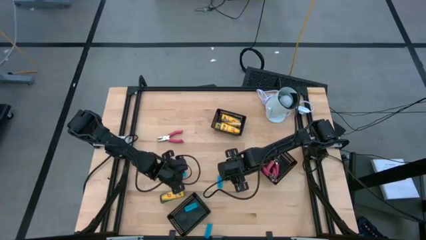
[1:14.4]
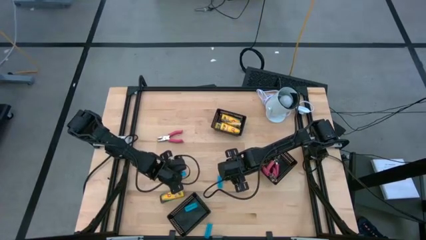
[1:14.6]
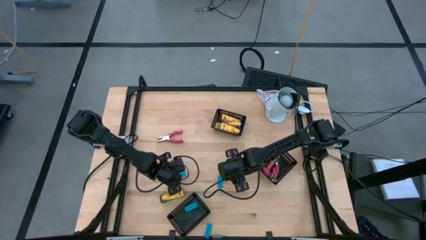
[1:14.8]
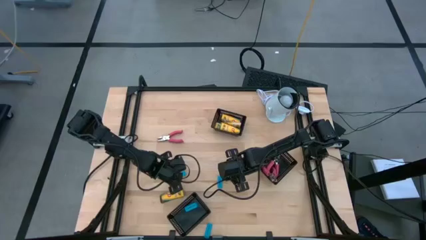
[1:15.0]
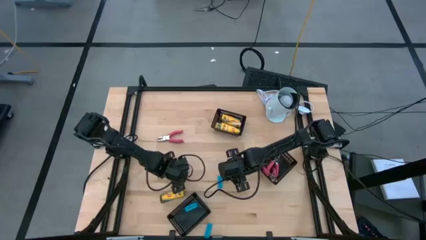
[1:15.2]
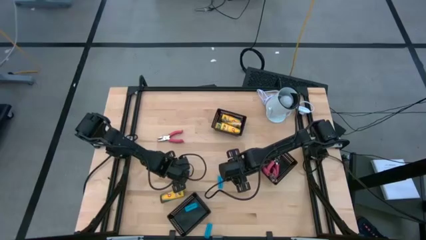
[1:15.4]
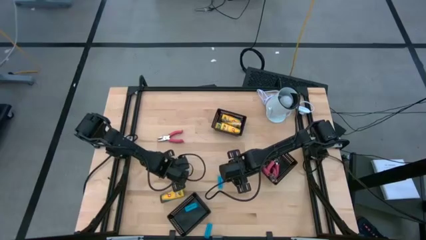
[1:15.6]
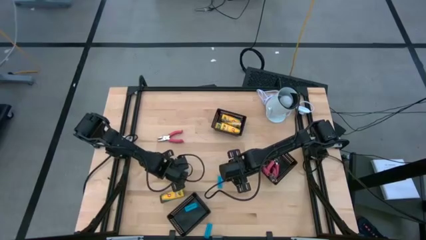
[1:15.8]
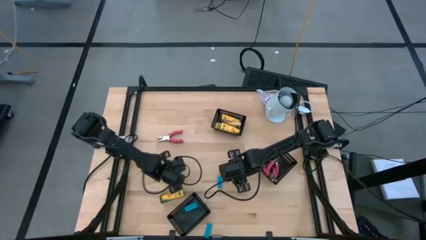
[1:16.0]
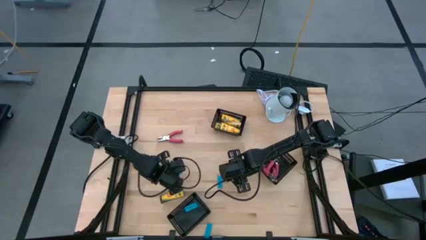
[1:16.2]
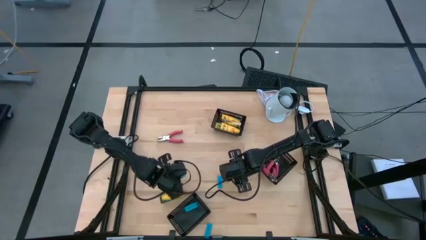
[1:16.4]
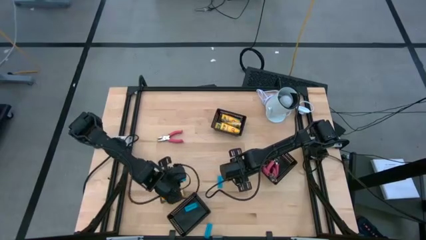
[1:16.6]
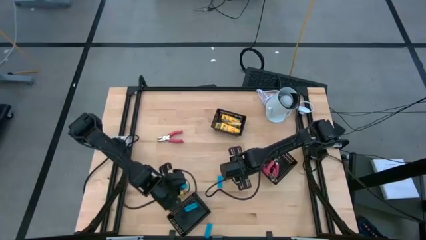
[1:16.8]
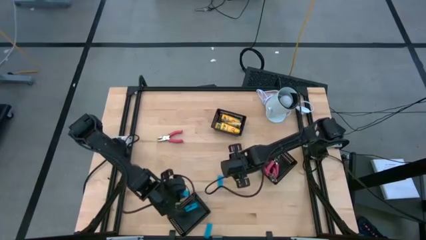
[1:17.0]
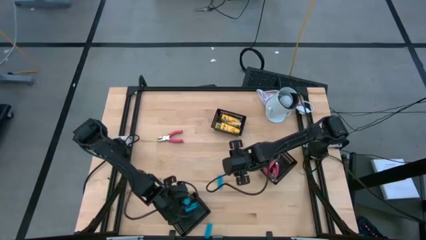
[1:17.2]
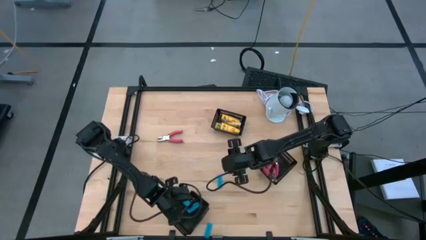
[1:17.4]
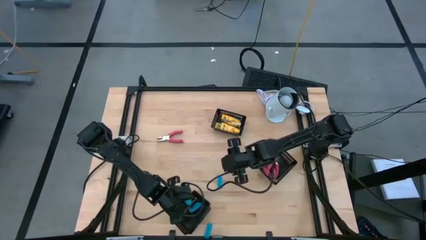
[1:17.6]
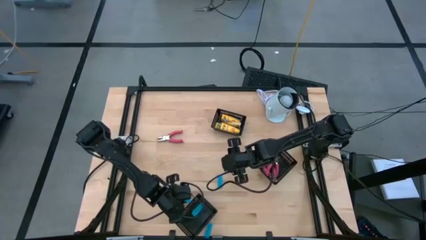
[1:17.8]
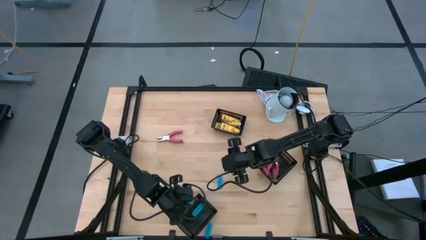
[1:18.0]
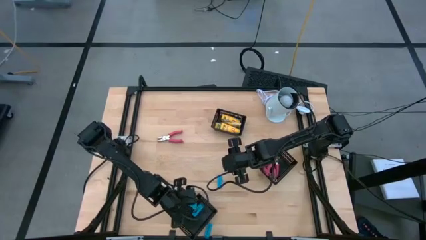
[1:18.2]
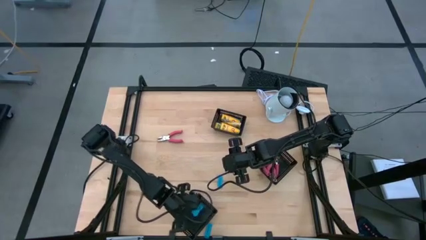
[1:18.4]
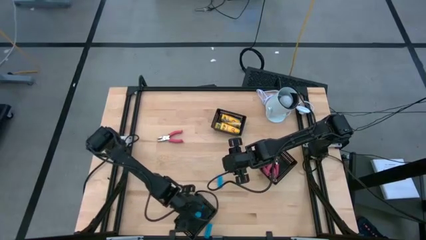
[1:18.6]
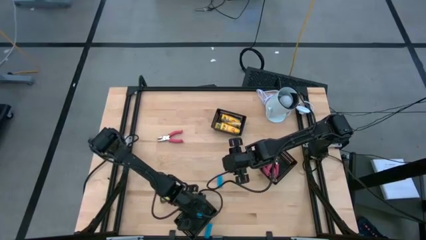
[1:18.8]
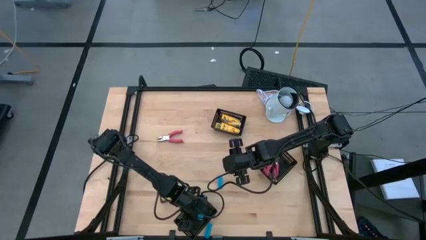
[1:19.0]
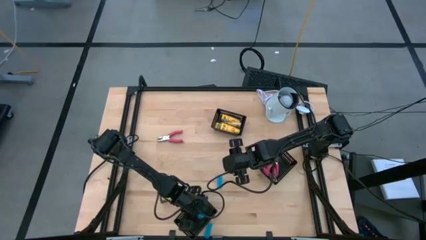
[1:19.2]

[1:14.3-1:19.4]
Task: Pick & Place School Supplies
Put the blue eraser into the bottom black bin

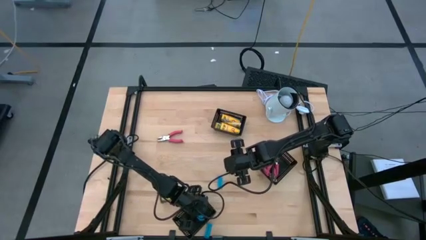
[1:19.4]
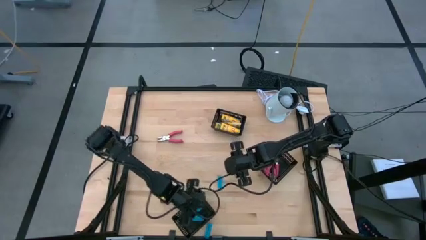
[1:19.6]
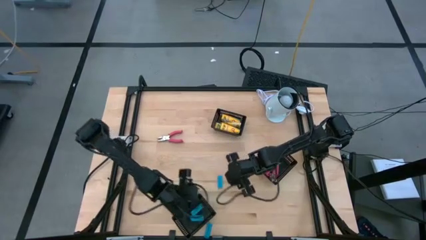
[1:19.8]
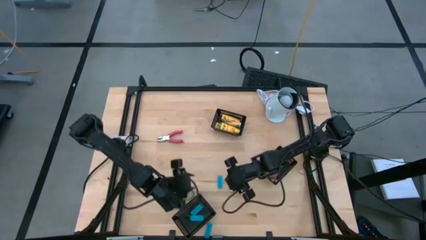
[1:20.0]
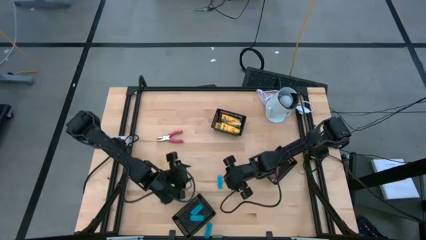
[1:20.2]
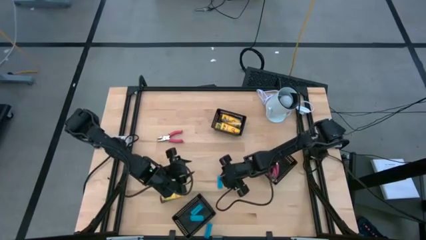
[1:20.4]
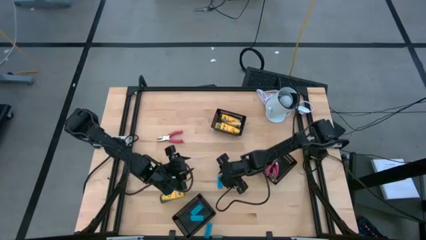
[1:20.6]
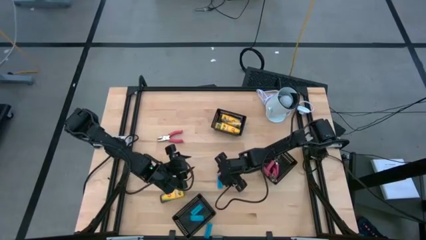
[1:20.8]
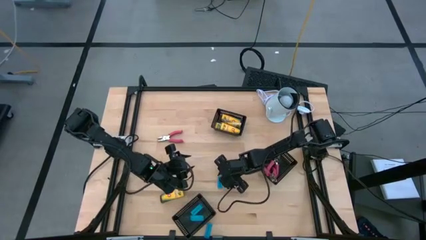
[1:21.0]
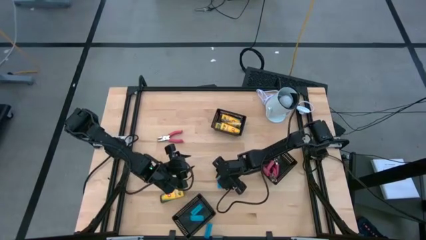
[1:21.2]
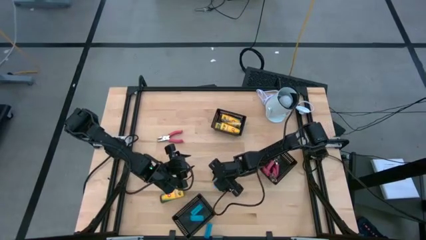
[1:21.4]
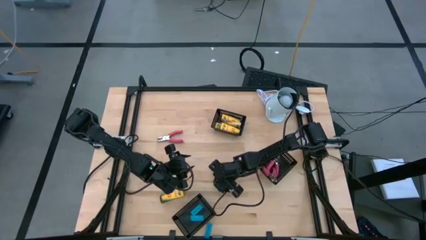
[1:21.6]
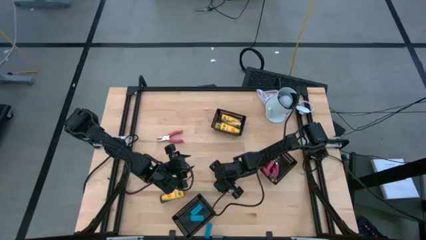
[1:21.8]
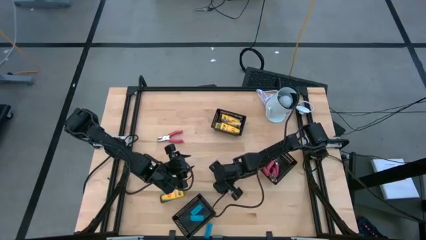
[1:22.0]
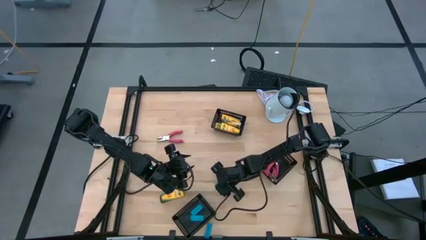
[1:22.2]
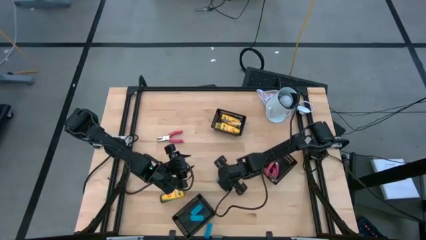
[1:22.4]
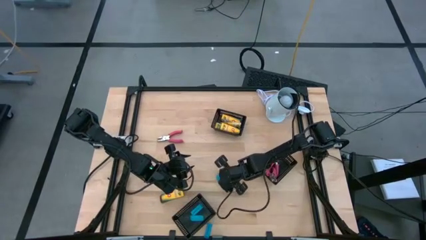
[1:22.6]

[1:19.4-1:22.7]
Put the blue eraser into the bottom black bin

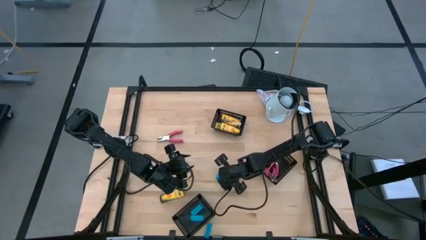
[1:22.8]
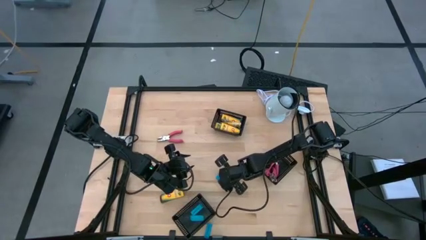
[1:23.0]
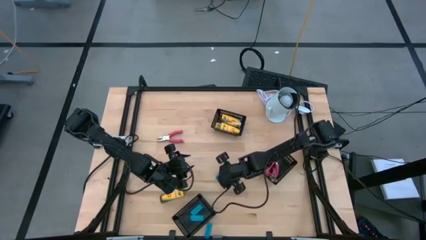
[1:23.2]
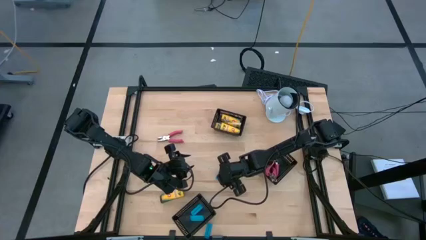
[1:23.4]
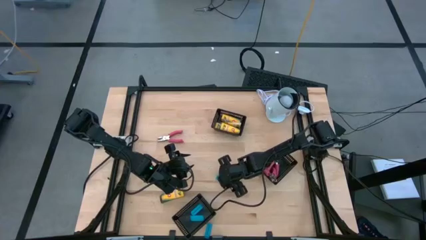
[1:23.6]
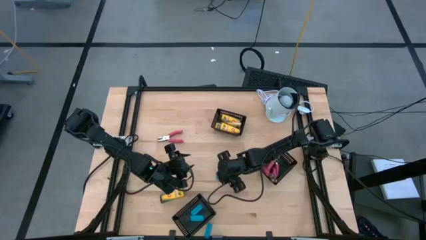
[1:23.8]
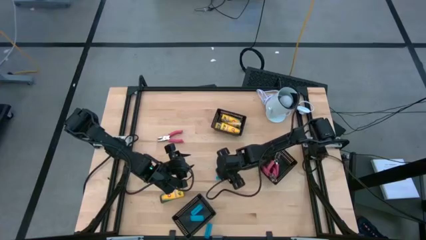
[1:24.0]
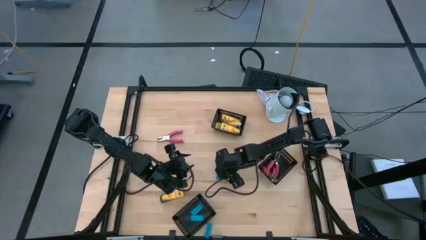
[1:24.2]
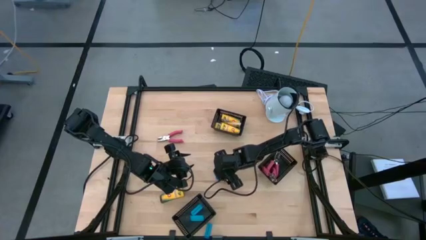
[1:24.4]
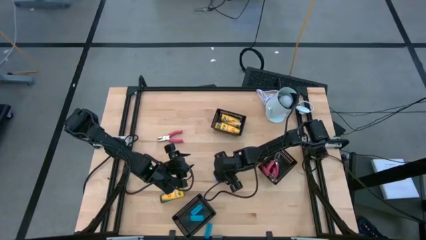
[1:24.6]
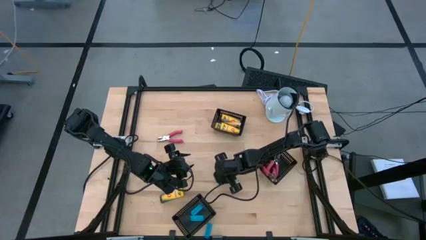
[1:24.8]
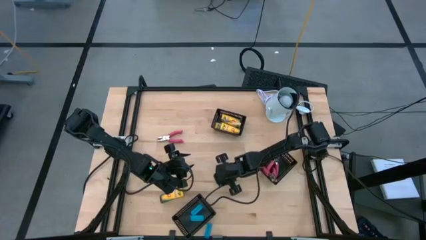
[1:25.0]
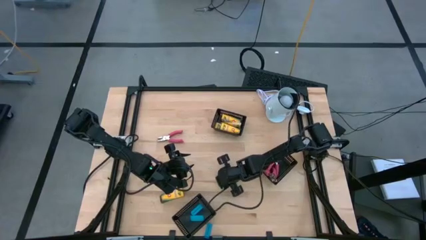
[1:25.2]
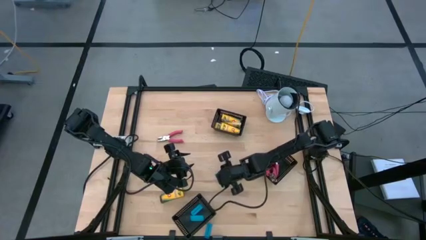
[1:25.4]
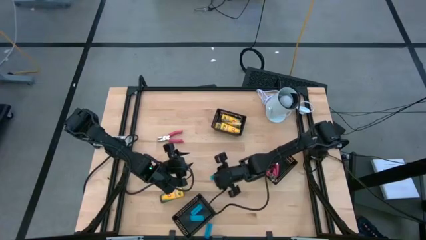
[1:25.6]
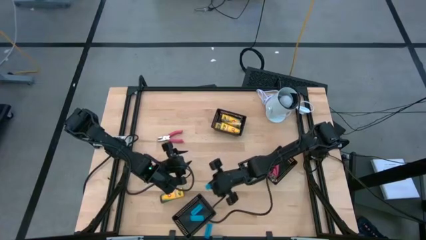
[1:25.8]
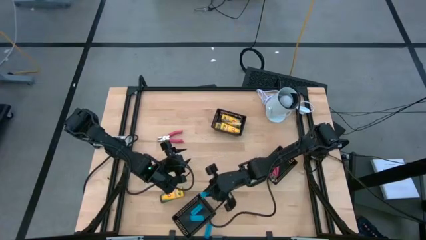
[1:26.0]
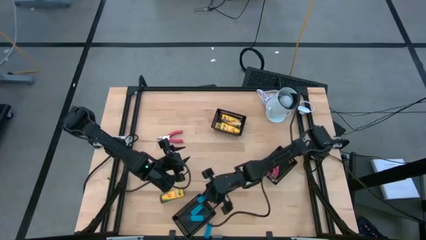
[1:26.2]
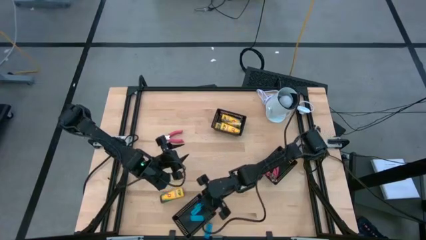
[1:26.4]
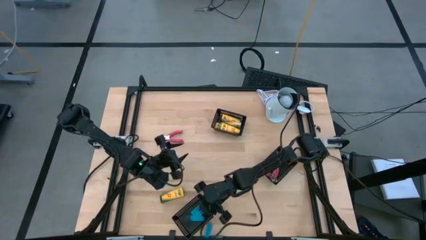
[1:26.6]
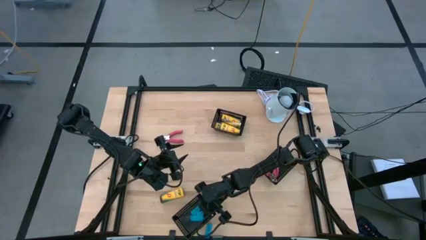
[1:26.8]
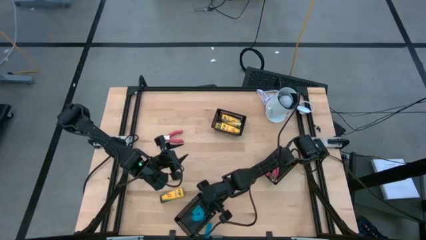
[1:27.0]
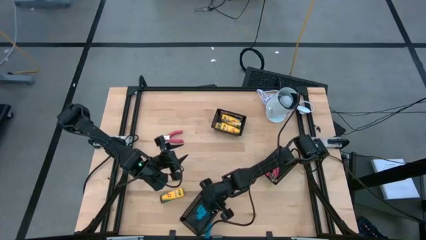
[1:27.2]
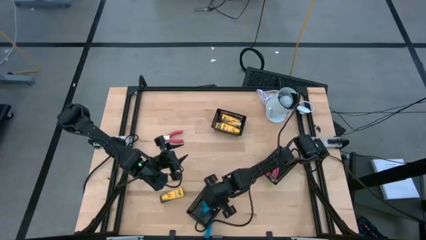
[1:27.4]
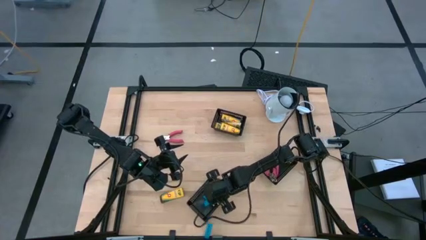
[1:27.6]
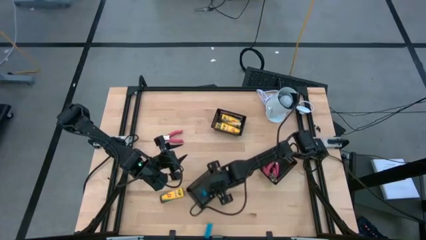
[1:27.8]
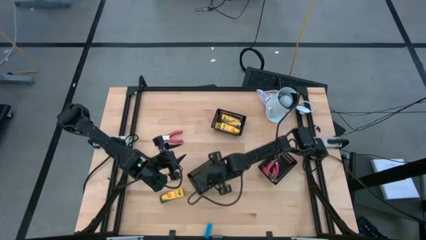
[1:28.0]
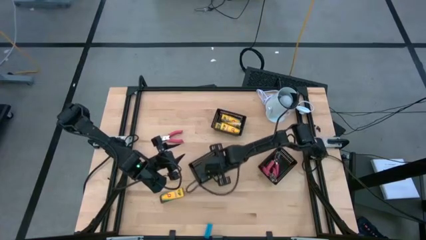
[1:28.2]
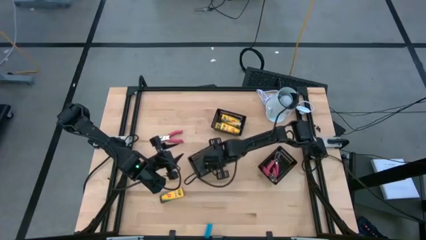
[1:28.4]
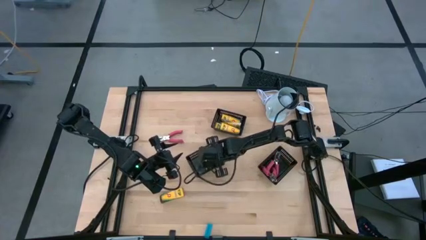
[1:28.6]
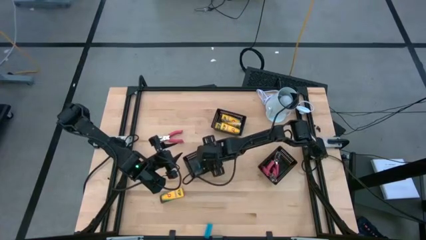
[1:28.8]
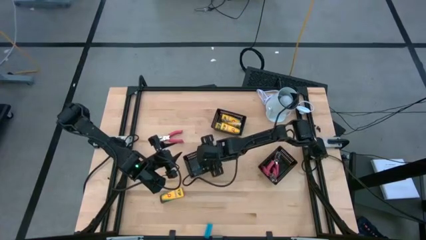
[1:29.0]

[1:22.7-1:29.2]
Put the blue eraser into the bottom left black bin

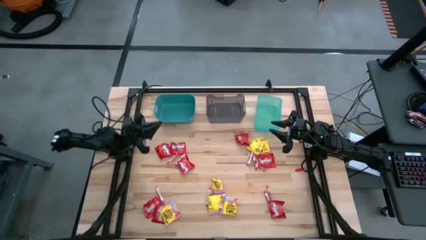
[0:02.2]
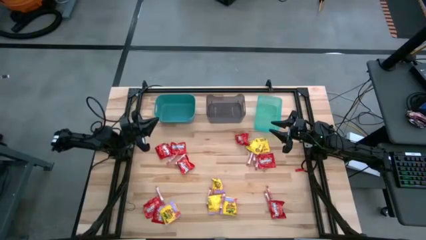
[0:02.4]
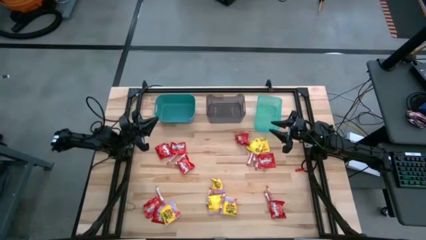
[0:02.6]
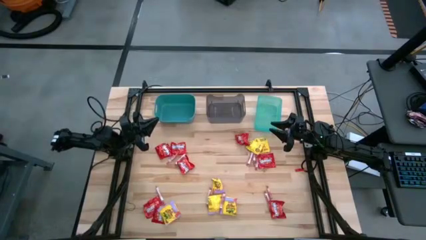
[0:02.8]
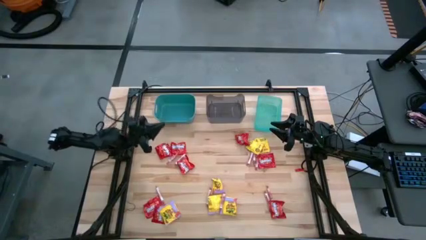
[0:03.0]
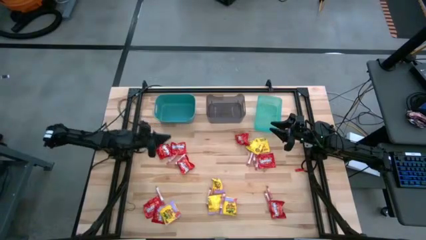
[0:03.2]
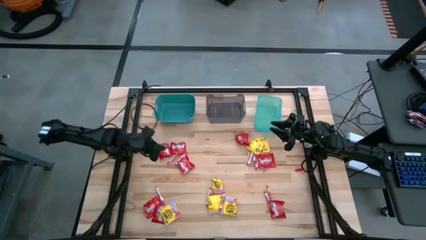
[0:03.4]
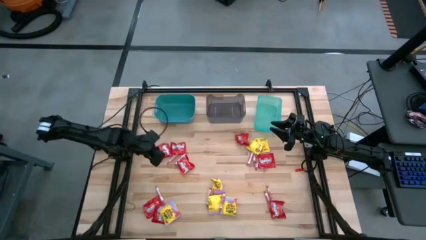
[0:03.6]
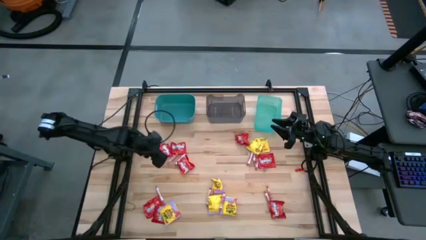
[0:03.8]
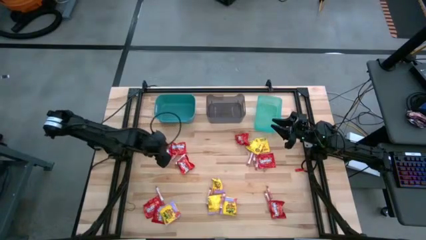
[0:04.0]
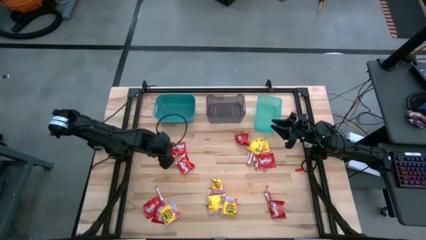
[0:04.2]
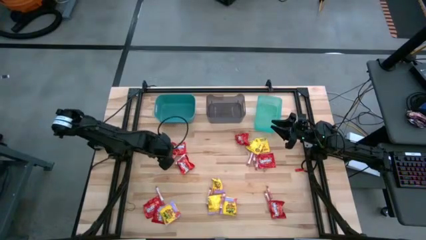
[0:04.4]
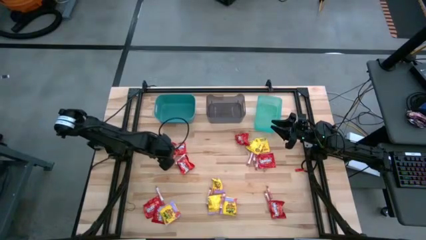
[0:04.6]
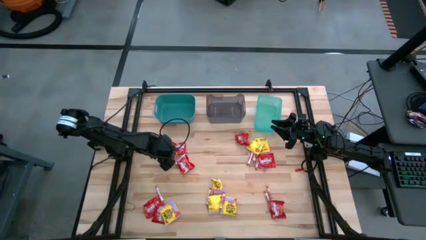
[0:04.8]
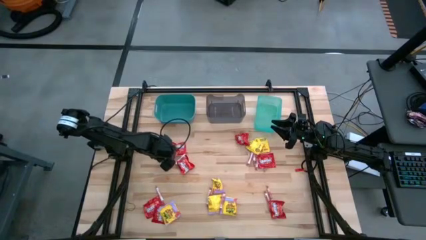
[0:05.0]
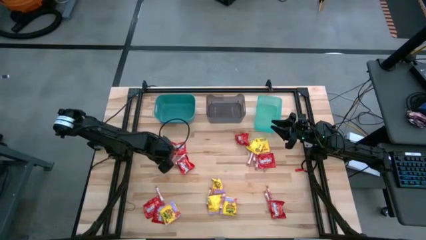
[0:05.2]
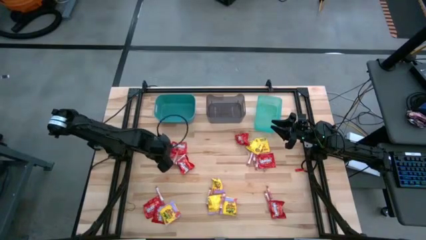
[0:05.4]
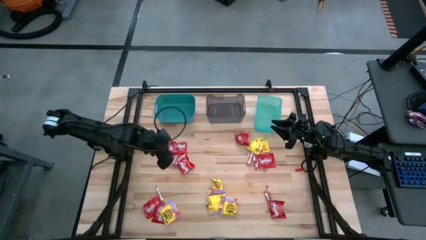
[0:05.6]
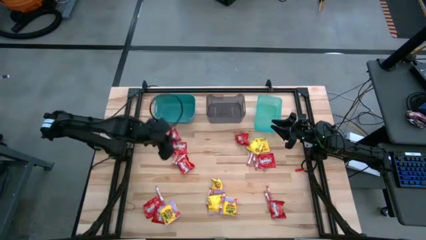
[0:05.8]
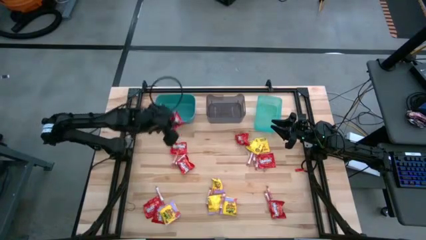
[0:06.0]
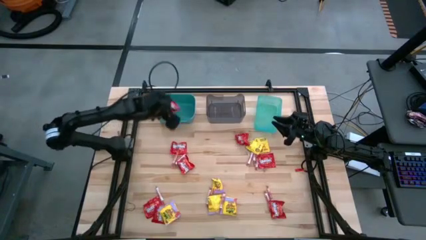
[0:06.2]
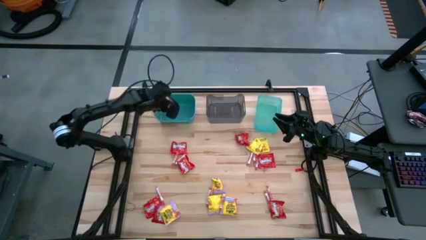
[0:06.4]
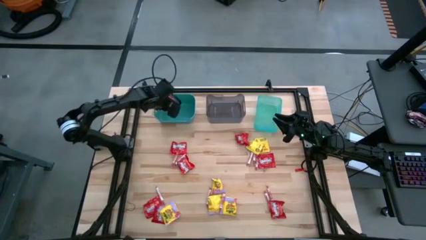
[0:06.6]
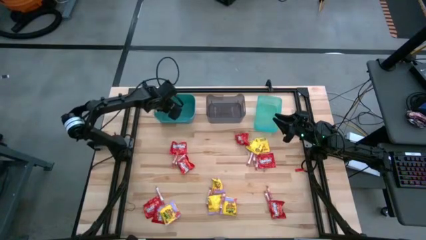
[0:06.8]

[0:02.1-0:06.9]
Task: Sort candy
Put the red candy into the green bin
